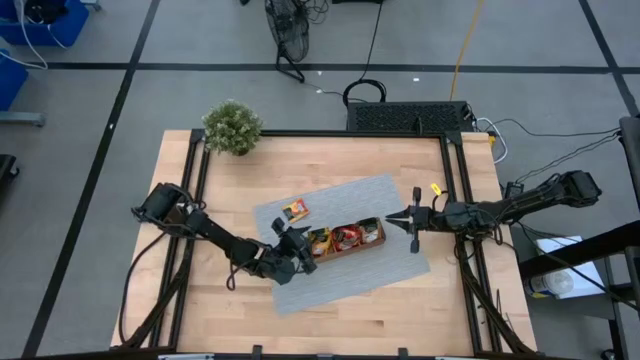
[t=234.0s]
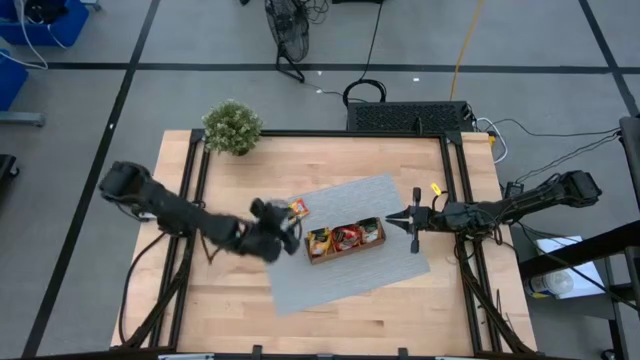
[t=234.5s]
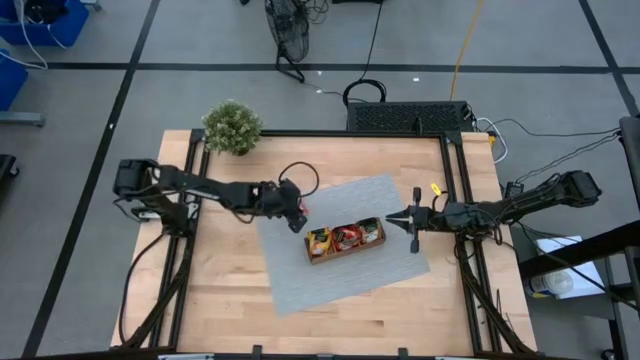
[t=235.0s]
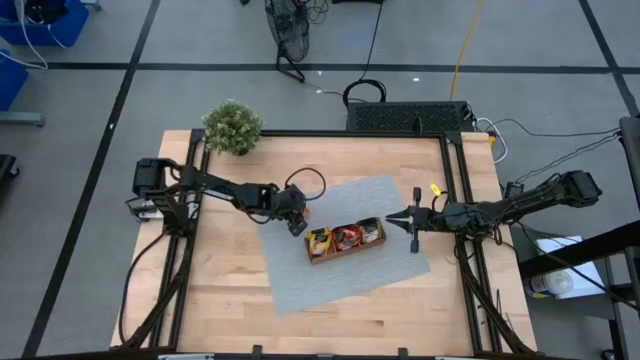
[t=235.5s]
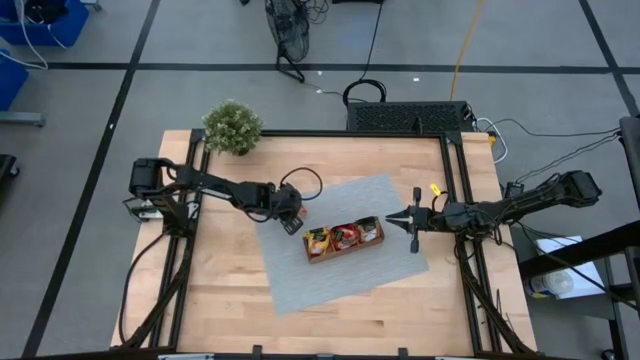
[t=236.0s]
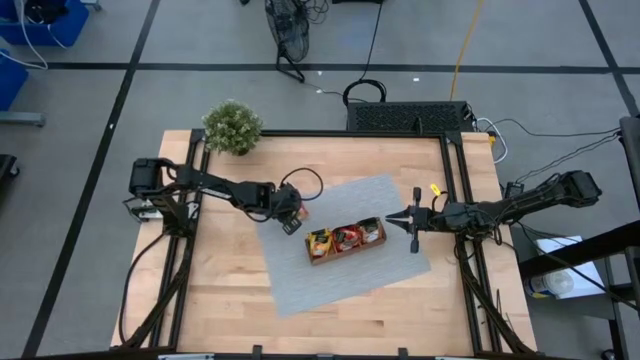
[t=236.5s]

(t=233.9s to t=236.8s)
Task: Pick & Place Tea
Put the yellow tea bag into the left section of the wooden organizer

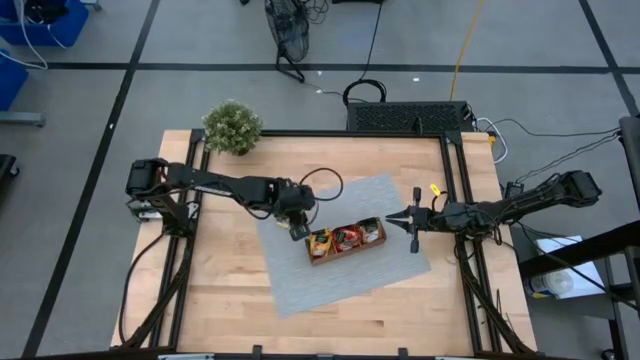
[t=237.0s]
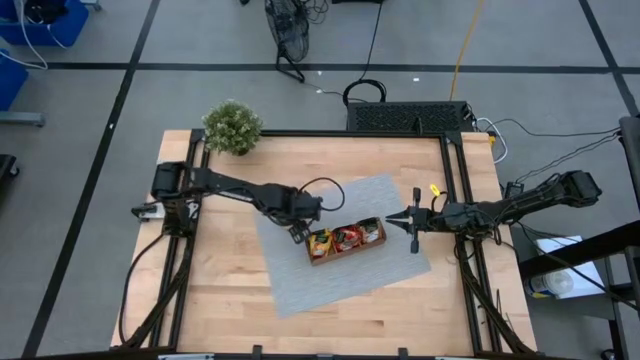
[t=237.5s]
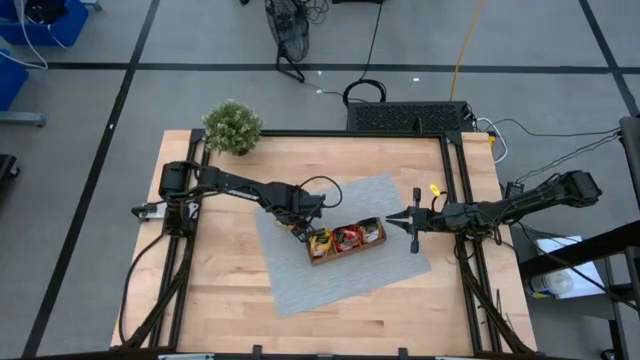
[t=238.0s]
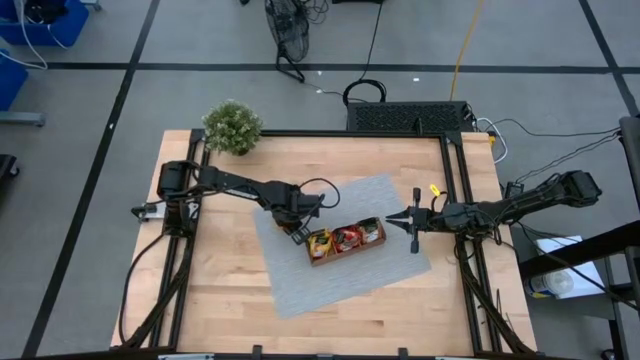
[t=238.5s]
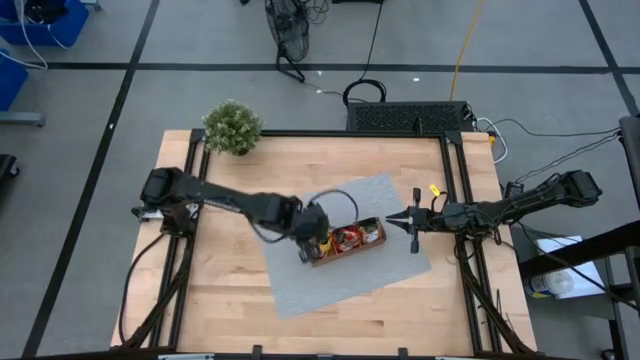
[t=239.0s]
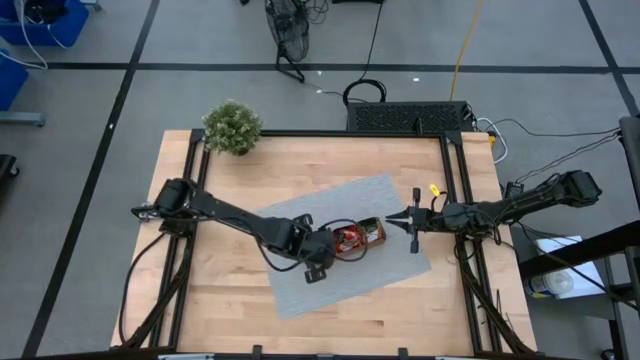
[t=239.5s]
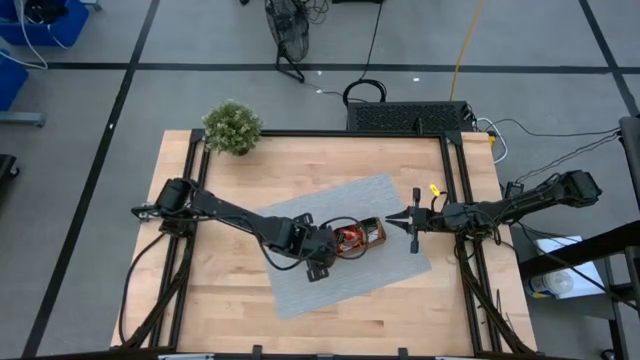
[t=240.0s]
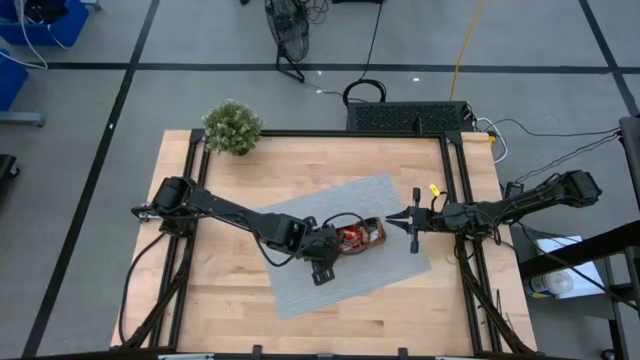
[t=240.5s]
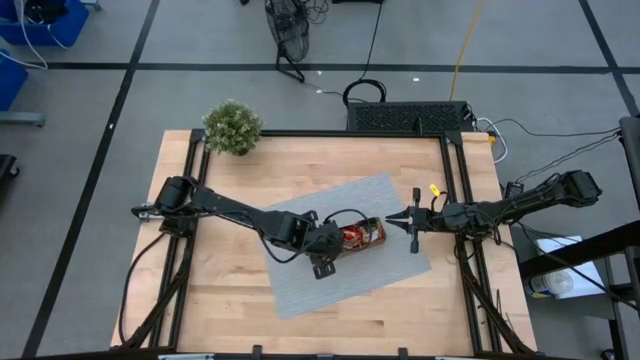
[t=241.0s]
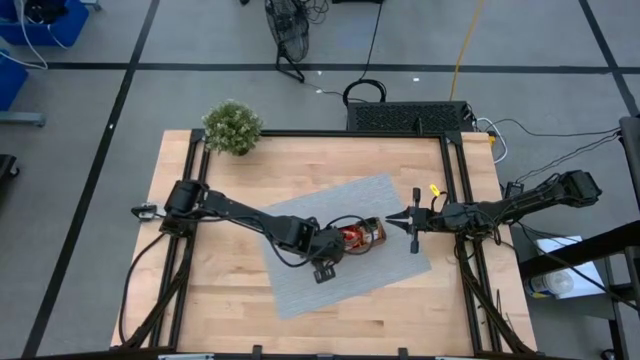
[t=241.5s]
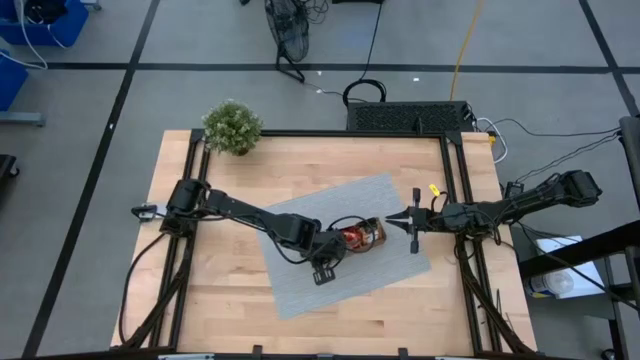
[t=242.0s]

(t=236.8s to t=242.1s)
Put the yellow tea bag into the left section of the wooden organizer

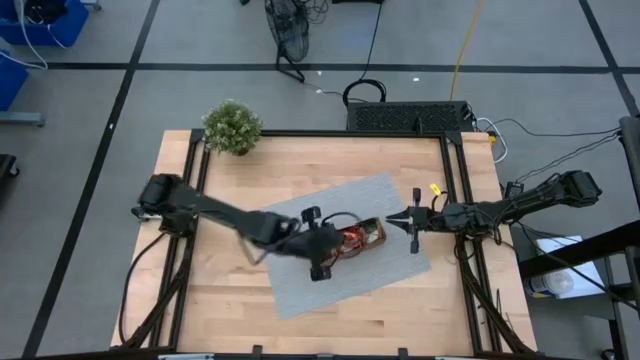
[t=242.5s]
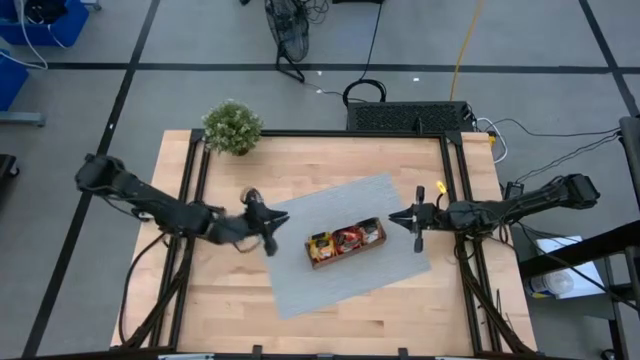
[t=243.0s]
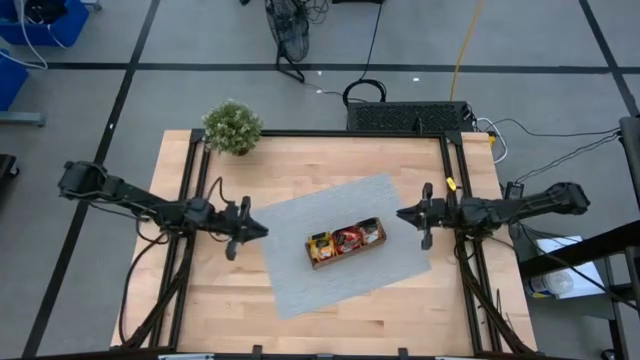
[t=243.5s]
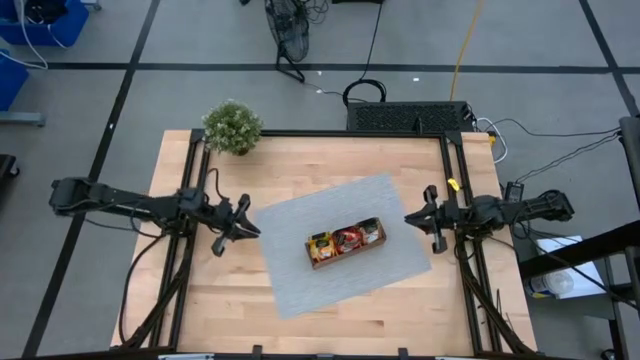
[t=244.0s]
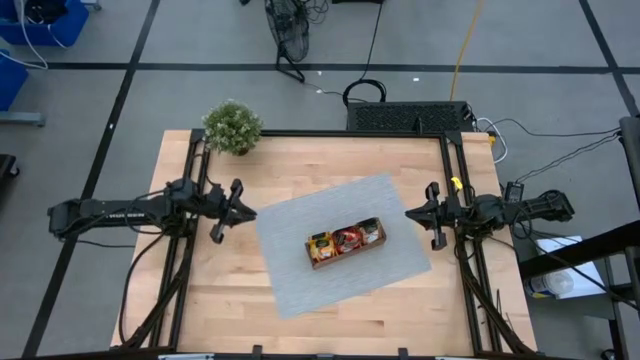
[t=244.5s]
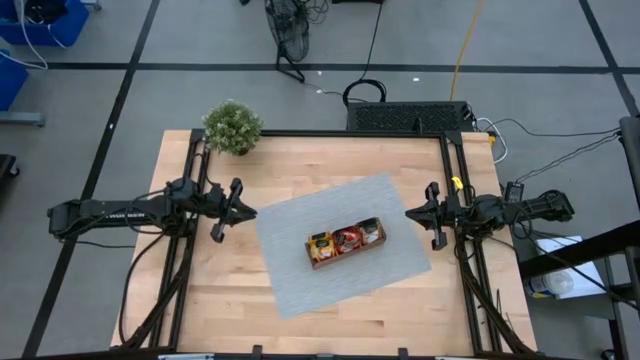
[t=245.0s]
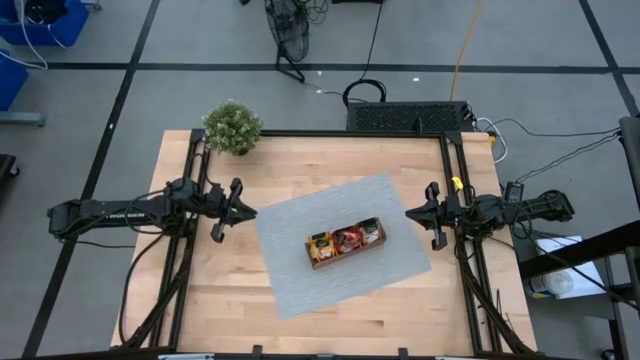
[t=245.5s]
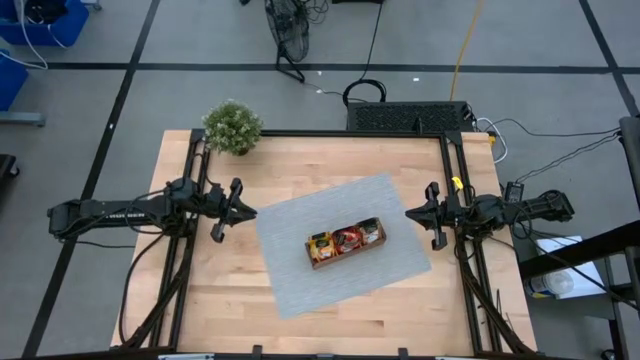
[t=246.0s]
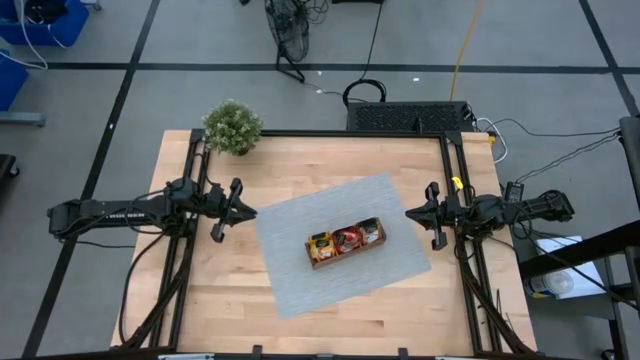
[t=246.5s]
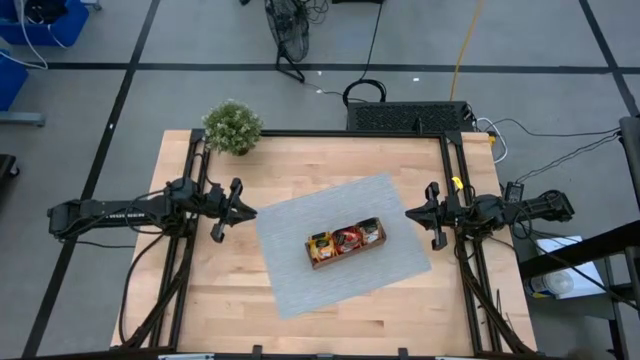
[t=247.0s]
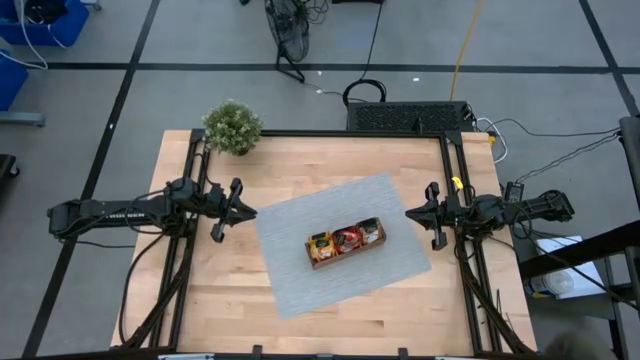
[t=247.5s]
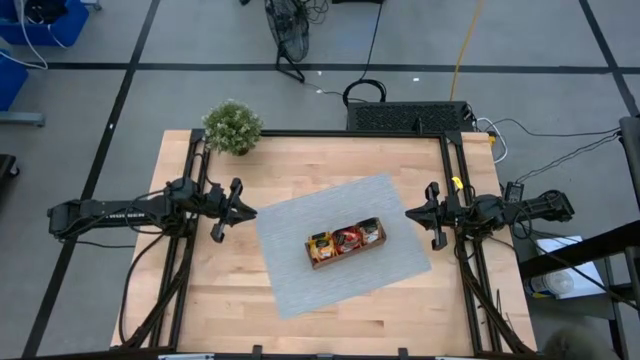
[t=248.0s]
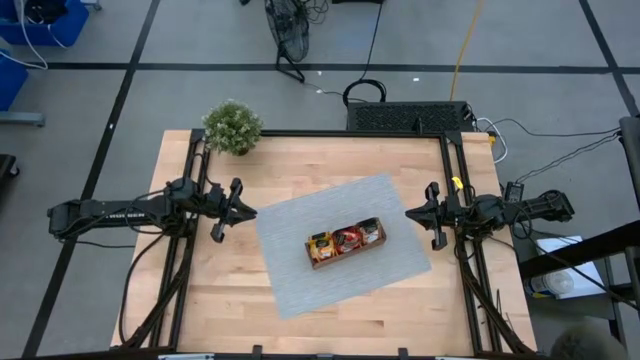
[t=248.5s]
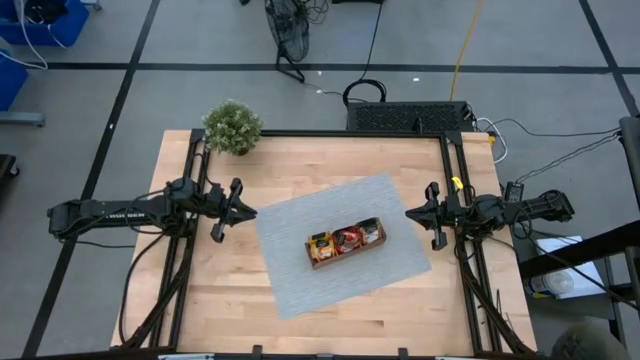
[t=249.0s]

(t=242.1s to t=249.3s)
Return to Home Position

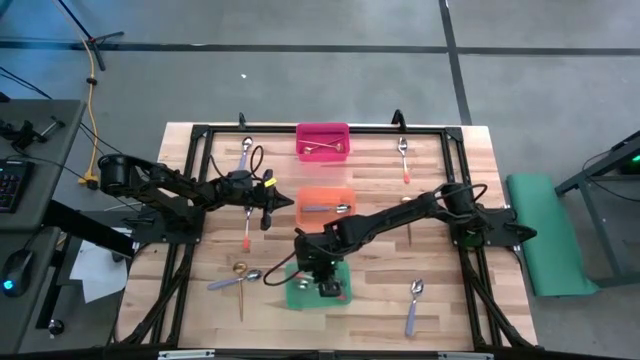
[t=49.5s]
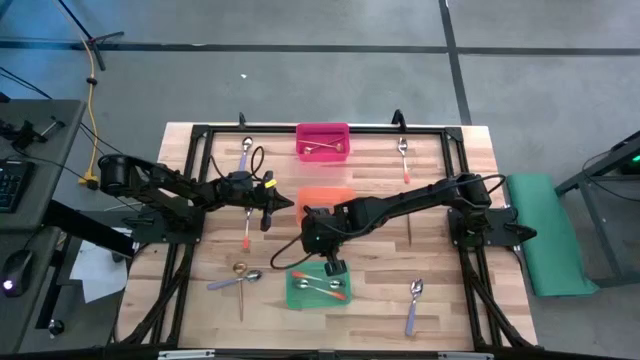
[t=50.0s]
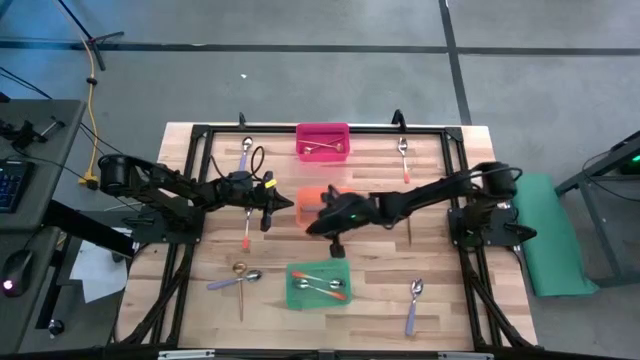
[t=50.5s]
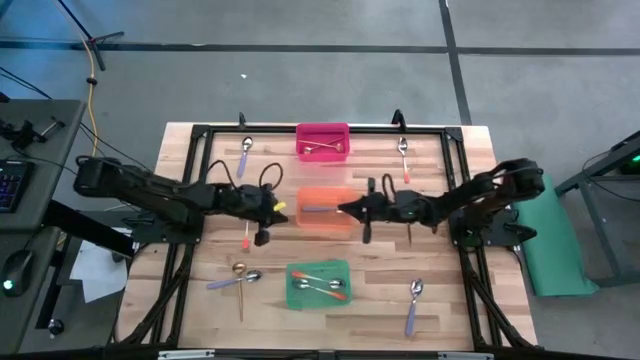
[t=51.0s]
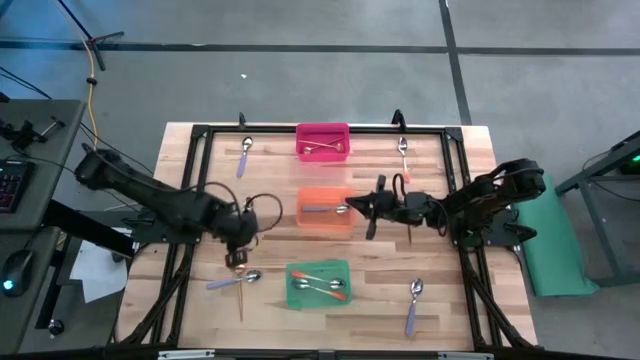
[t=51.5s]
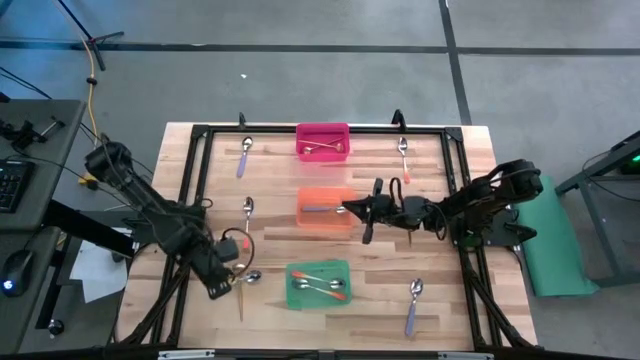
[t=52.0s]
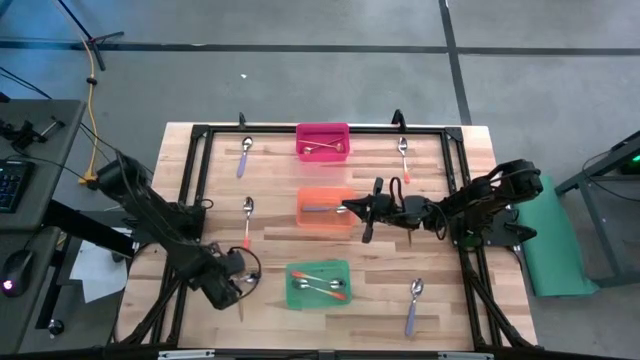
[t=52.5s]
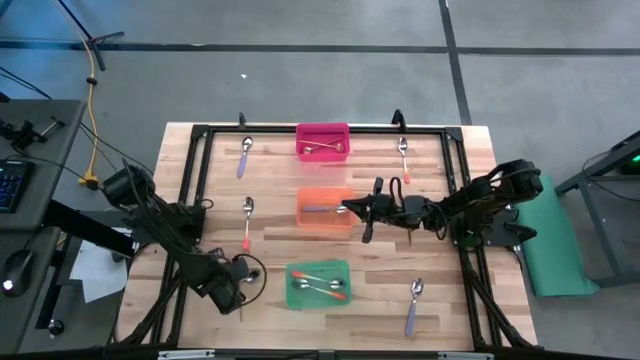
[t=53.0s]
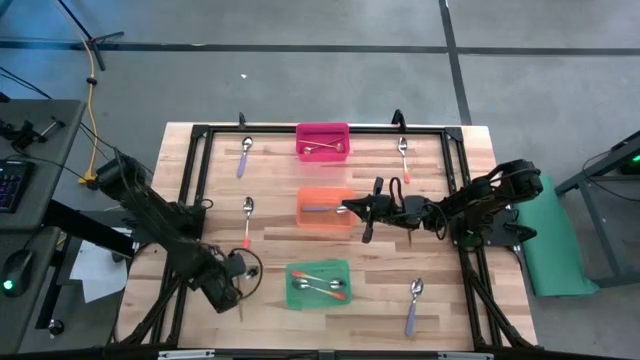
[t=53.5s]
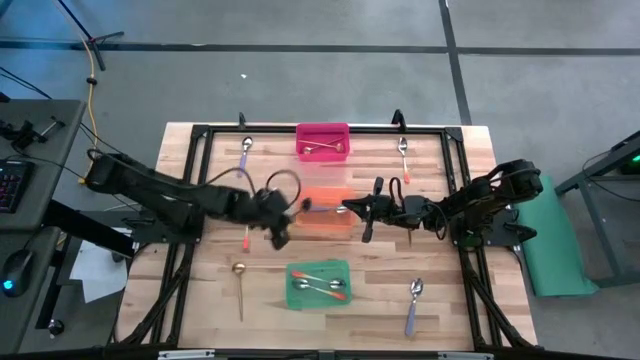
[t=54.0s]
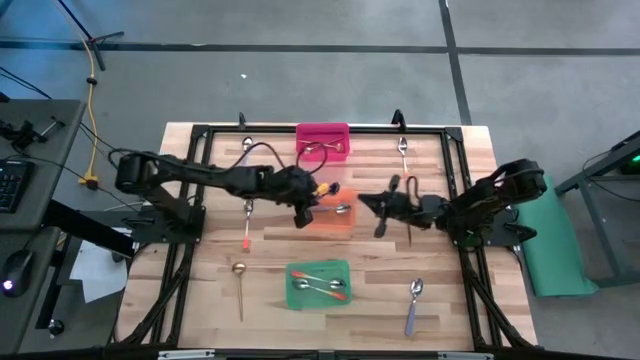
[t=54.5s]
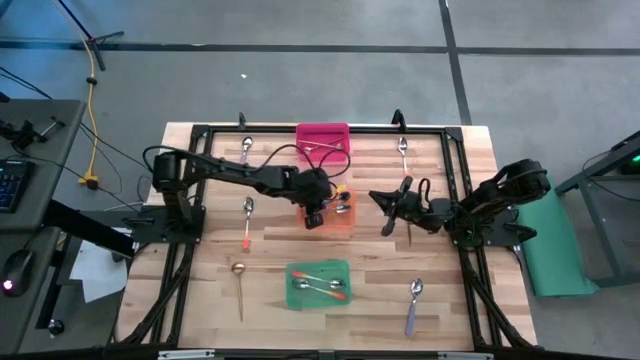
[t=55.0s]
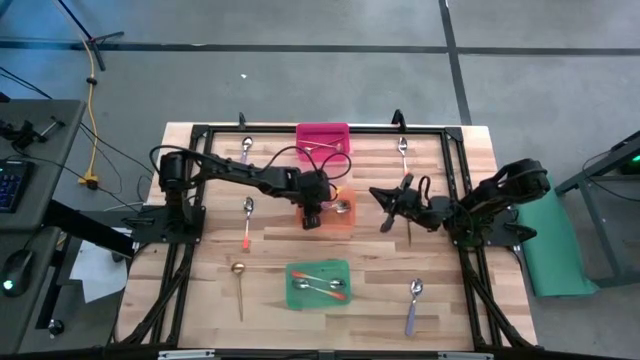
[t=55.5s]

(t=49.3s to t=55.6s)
Task: Sort silverware by color (type)
Put the bottom left violet spoon into the orange bin
